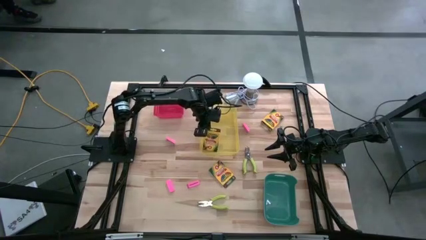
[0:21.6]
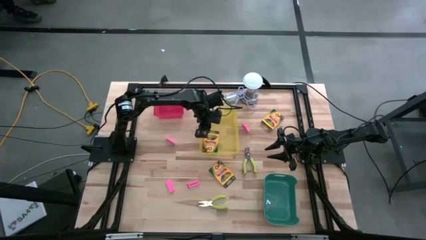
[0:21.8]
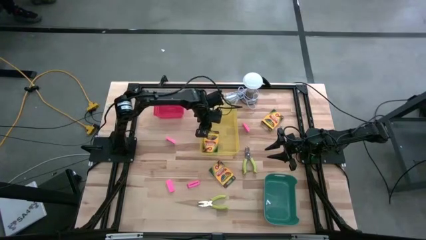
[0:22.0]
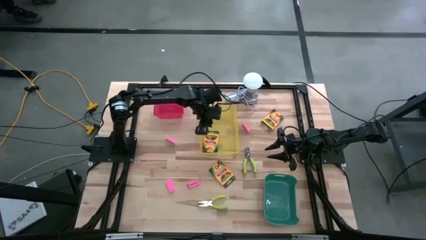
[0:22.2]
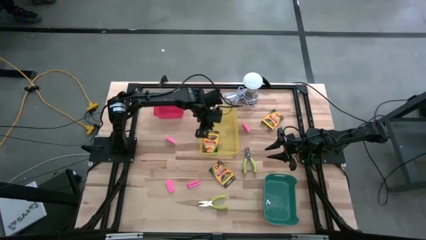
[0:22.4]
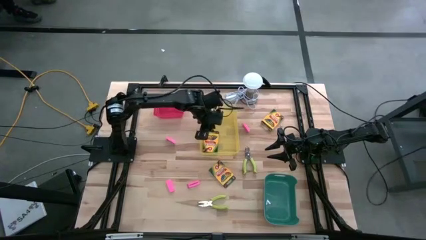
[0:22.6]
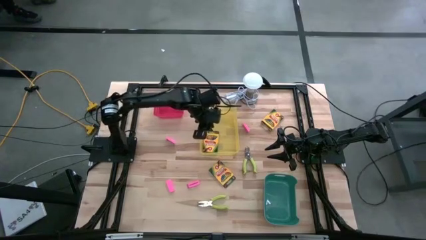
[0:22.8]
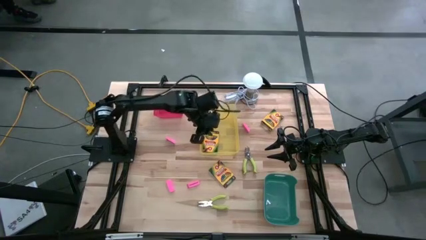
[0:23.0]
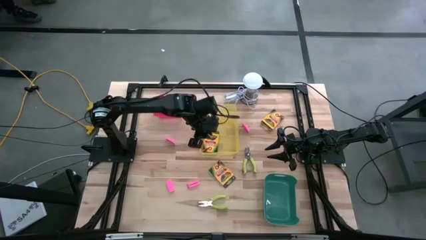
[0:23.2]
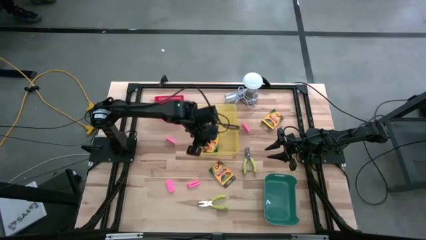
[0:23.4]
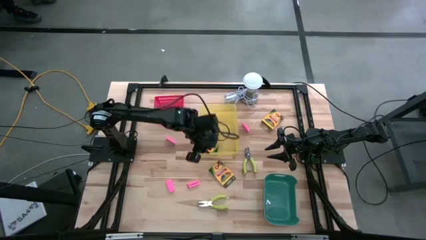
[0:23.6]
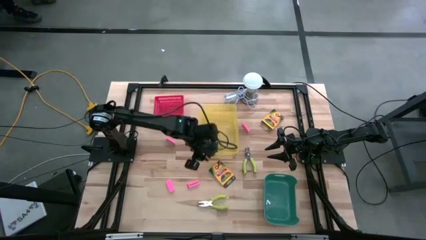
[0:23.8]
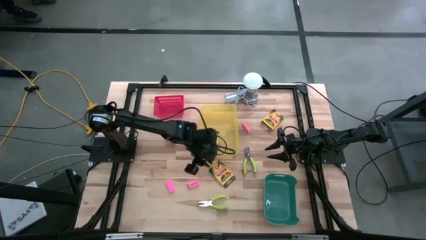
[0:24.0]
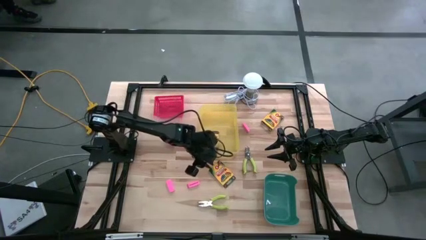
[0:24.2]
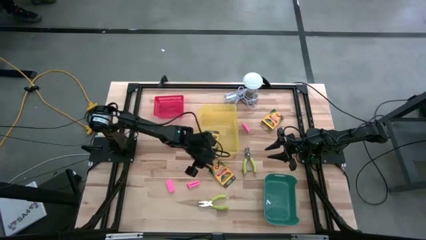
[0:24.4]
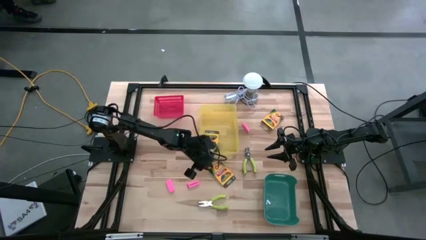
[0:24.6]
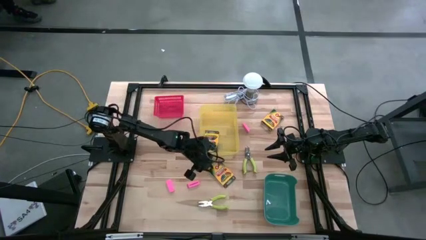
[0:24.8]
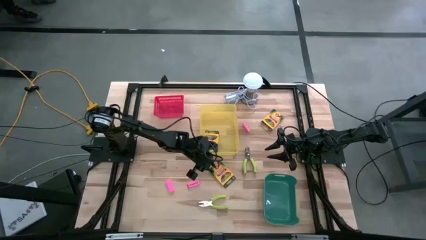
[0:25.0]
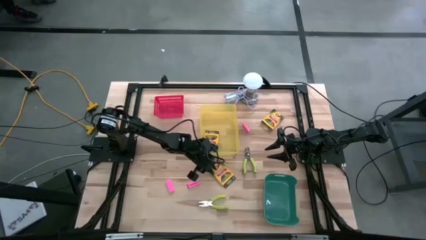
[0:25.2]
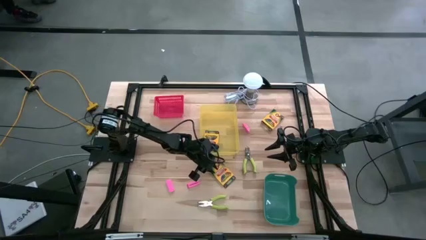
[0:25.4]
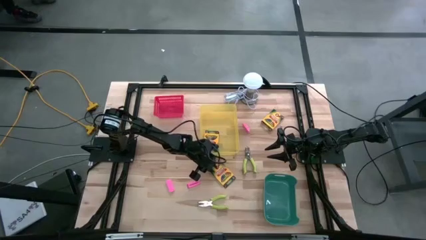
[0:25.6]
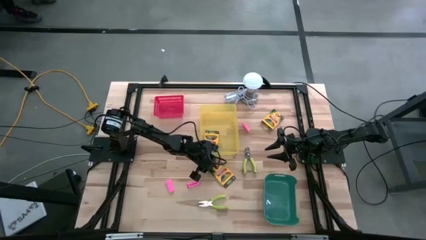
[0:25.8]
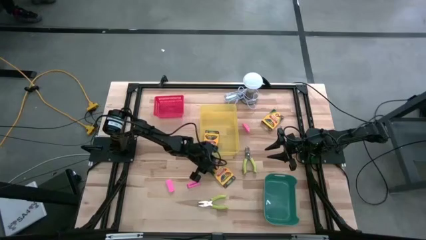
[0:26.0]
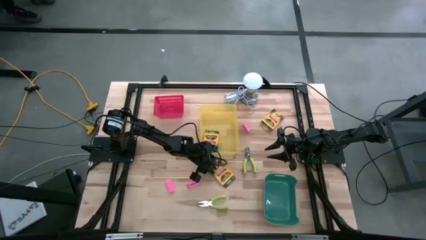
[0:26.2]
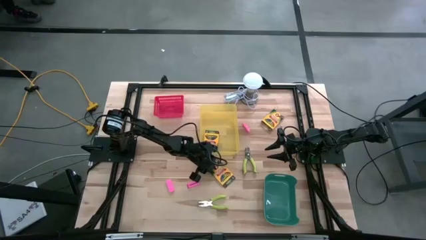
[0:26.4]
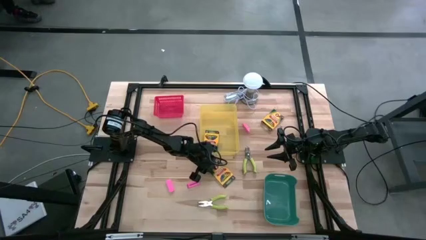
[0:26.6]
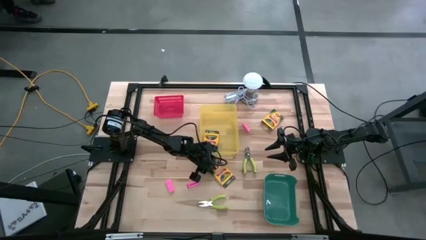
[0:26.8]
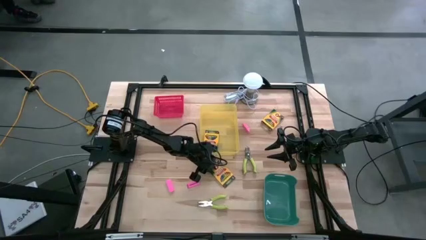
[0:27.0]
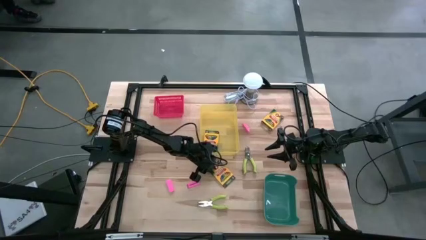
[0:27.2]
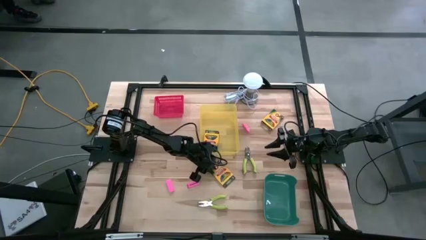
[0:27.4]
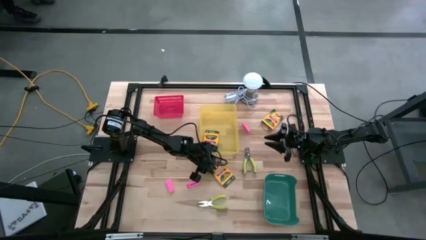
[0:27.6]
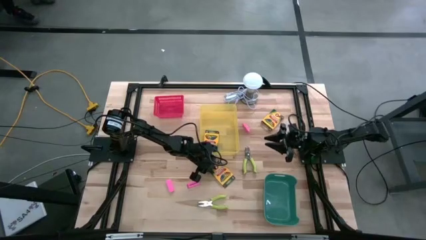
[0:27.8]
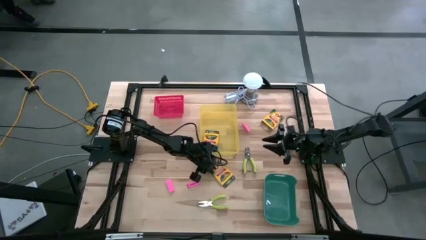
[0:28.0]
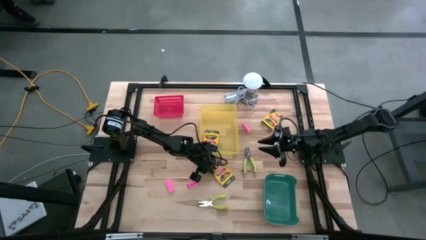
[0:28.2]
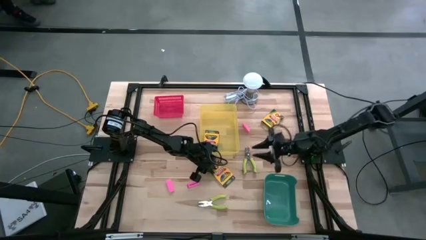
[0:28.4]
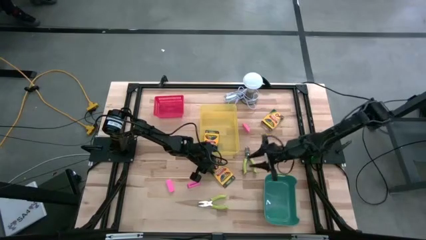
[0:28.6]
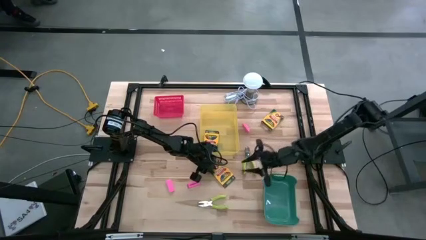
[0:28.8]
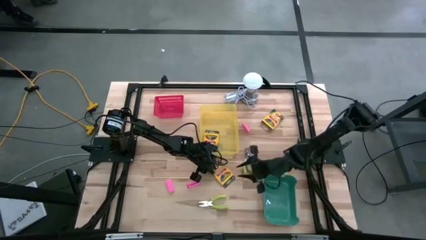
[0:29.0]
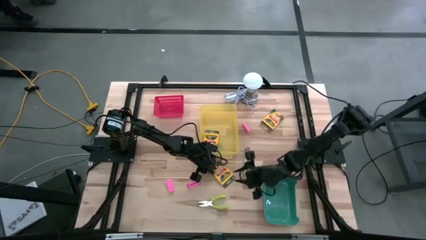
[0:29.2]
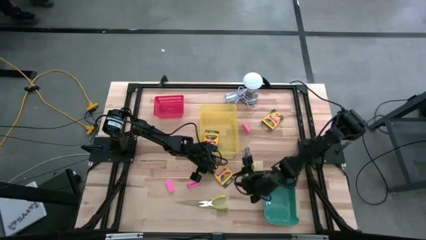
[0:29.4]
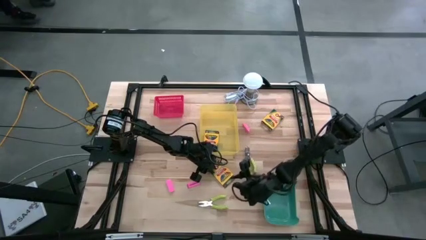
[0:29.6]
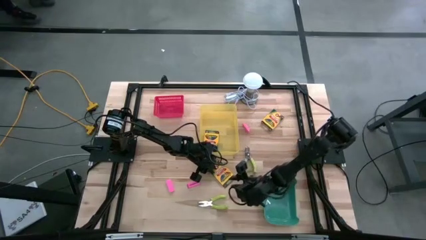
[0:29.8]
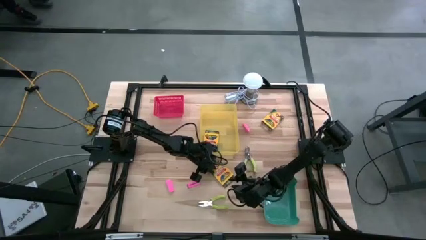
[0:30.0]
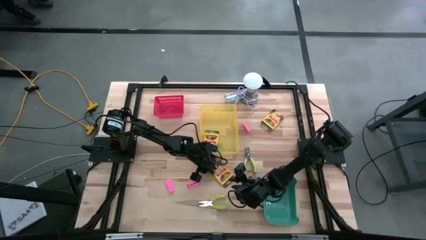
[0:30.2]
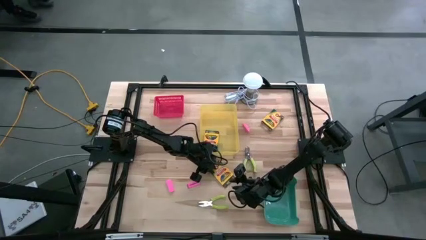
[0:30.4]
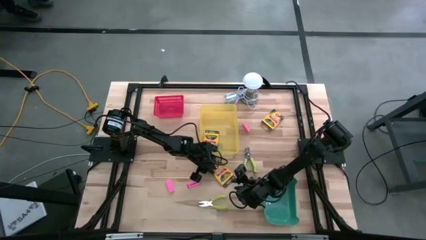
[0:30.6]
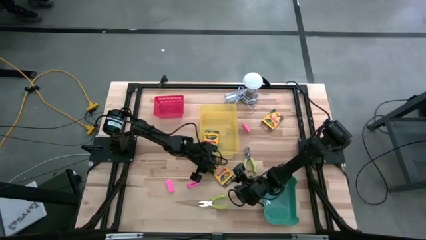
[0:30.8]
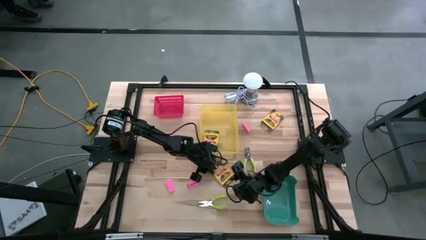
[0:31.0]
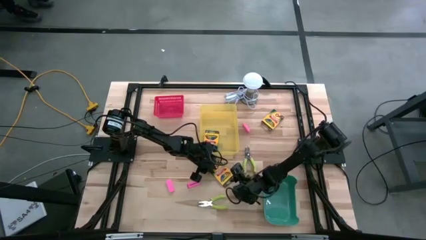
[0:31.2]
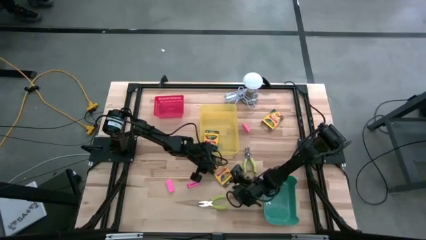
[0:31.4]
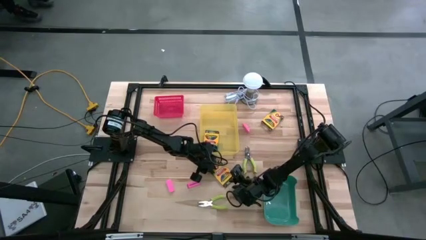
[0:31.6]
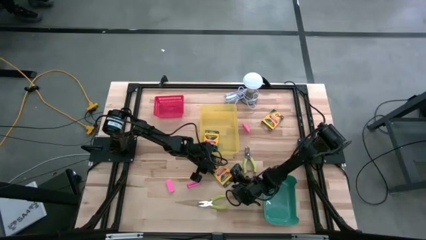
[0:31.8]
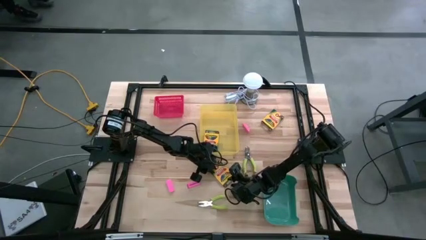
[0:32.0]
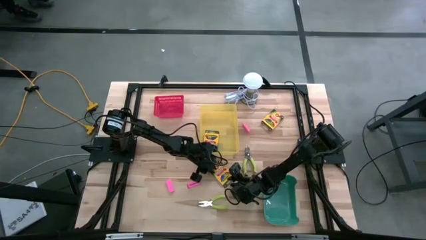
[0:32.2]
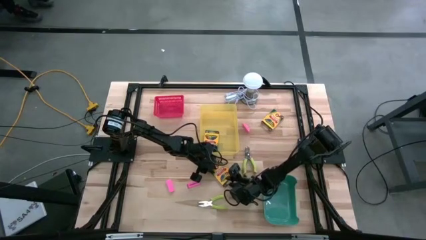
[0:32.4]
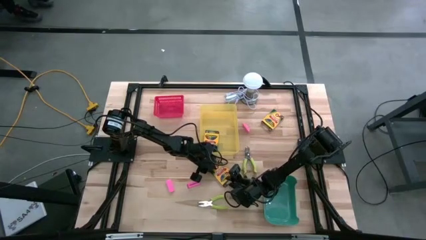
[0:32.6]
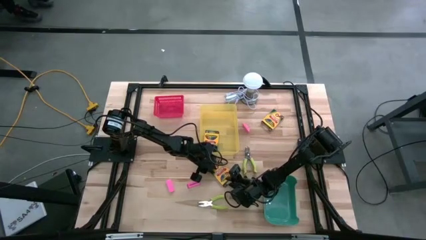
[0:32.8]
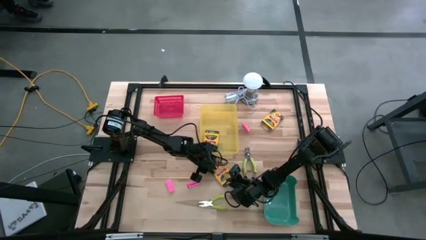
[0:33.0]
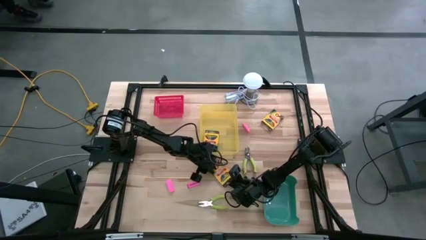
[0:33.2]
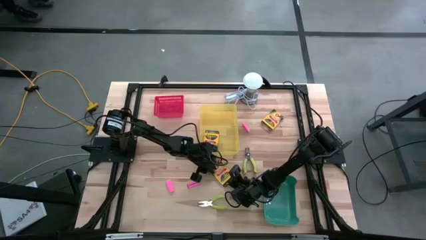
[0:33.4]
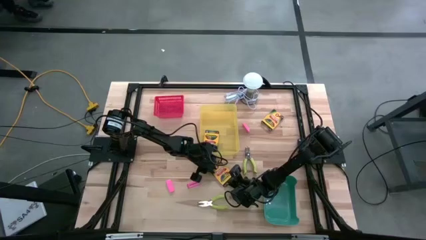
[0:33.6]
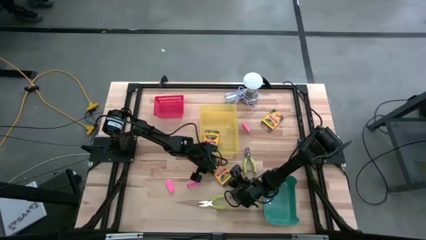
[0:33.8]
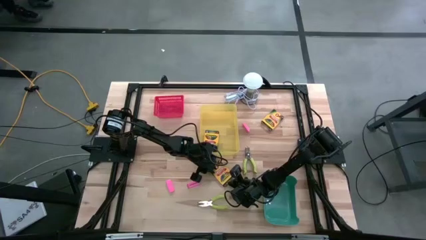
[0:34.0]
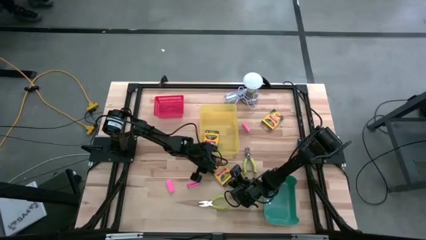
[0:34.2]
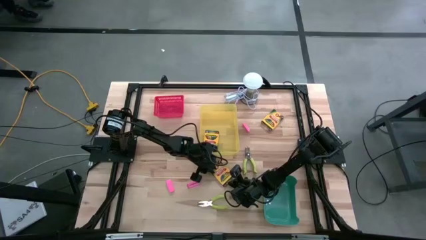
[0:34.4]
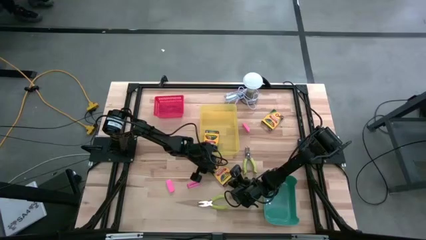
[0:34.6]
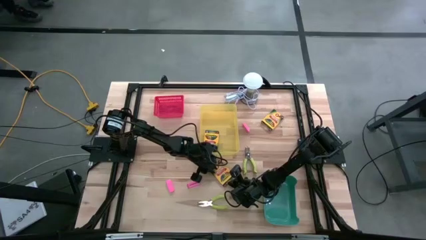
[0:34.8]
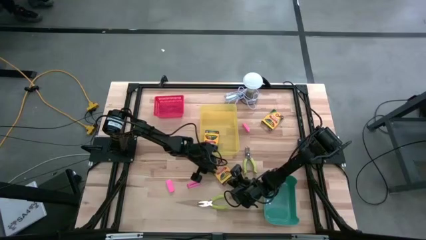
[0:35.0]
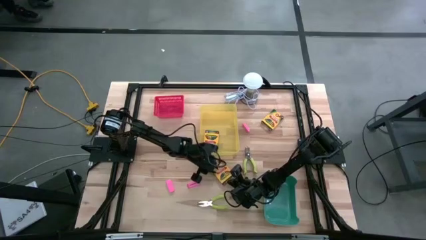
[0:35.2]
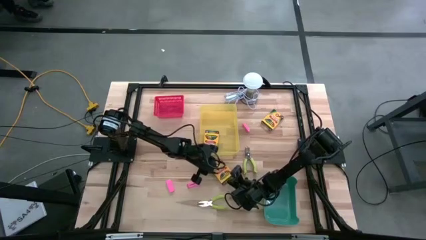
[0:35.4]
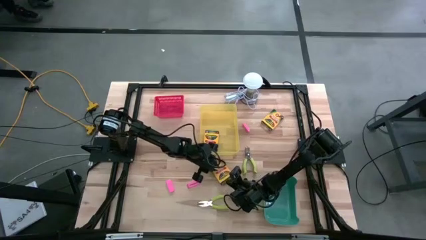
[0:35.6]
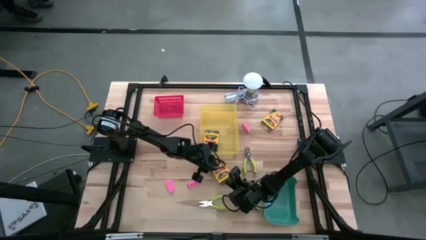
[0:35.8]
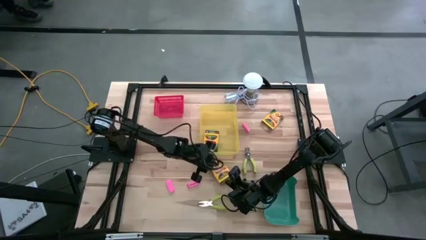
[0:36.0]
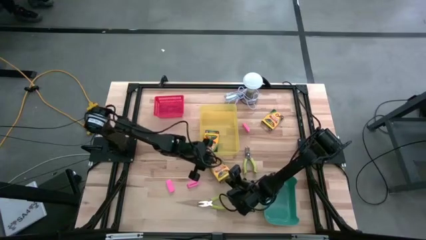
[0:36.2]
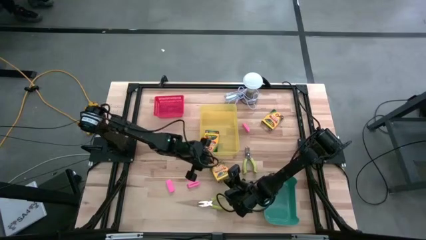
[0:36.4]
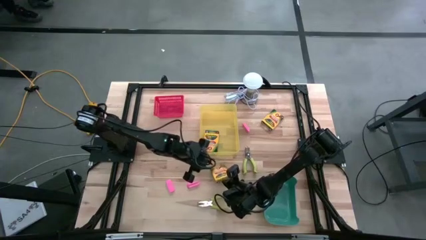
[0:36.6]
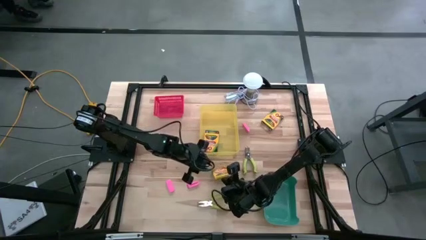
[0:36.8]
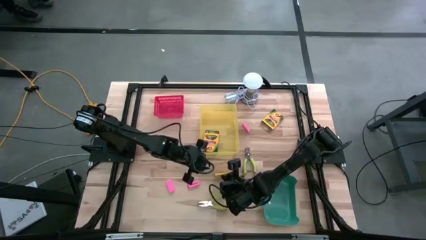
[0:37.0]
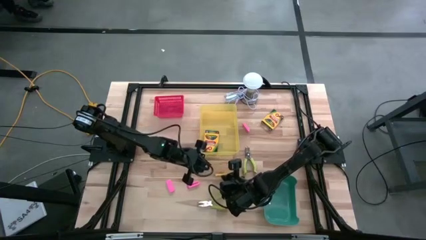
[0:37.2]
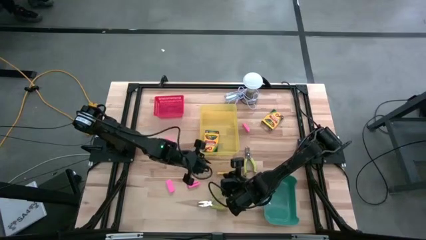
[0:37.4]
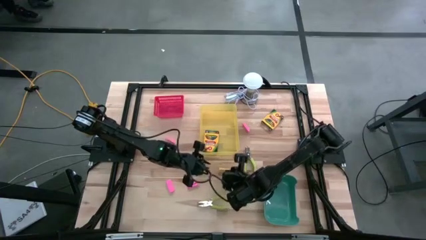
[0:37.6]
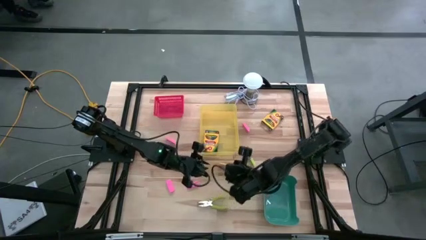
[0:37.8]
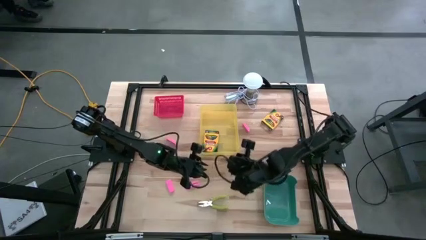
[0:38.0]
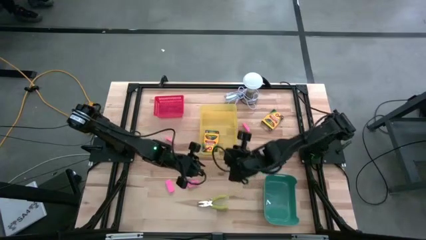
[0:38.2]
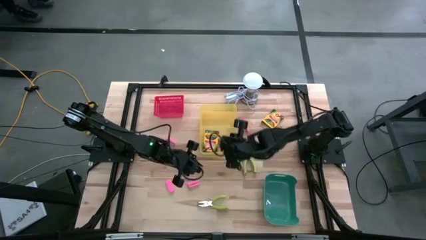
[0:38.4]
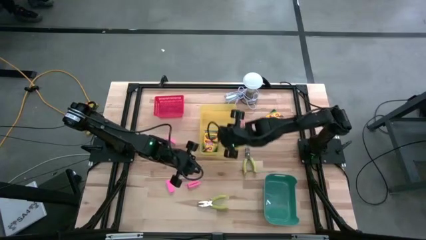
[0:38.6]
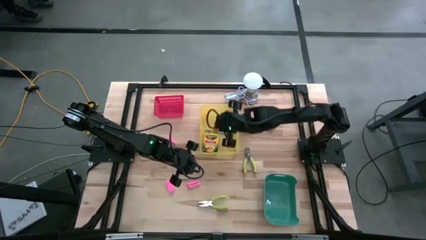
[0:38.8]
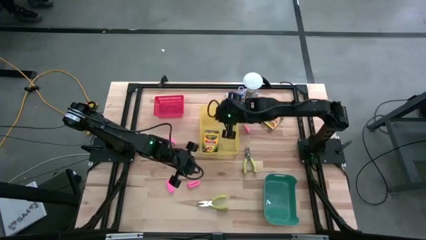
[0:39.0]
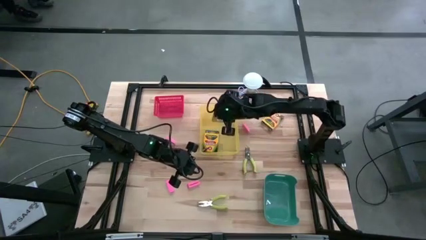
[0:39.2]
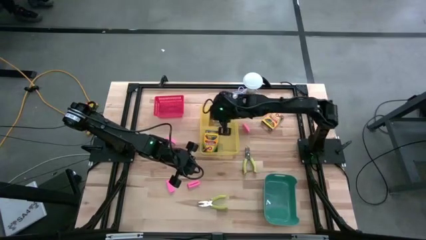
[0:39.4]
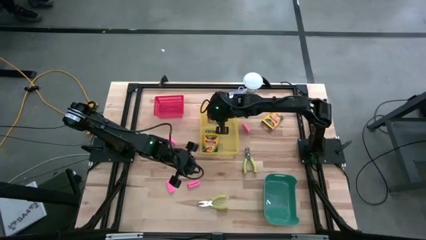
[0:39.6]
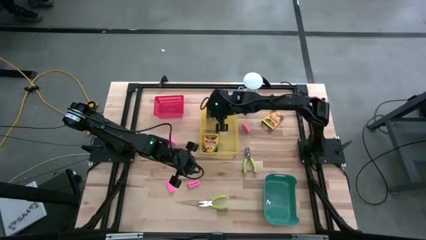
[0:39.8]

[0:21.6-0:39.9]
Task: Pick & Place School Supplies
Put the yellow crayon box into the yellow bin
